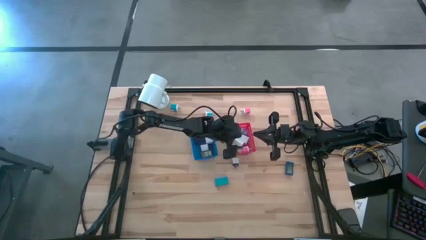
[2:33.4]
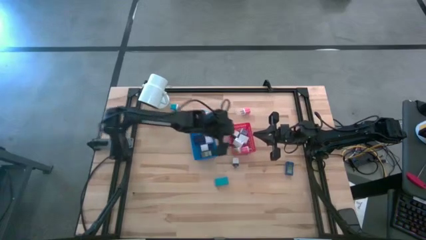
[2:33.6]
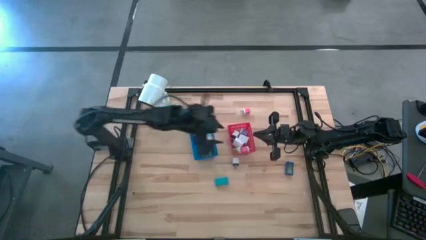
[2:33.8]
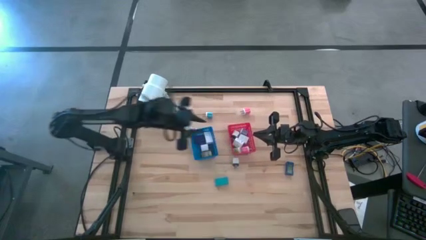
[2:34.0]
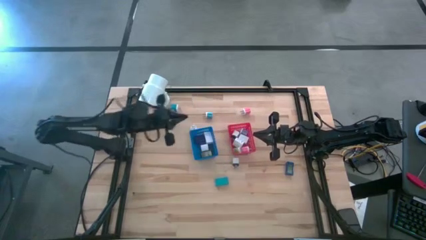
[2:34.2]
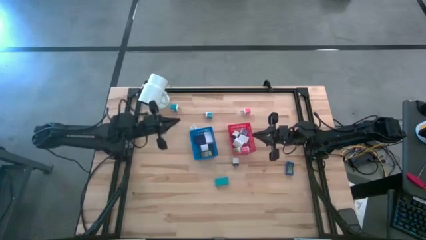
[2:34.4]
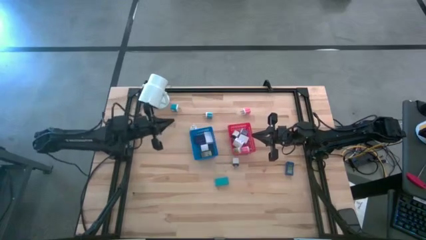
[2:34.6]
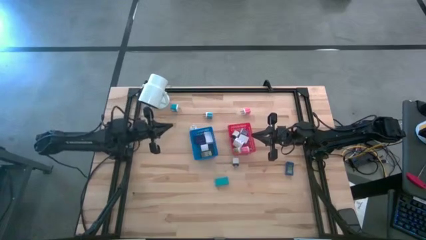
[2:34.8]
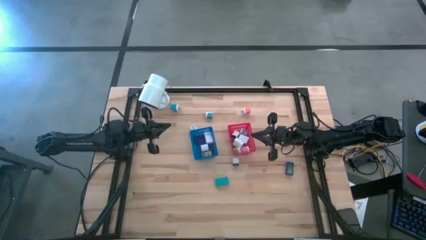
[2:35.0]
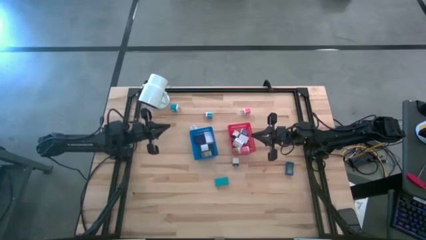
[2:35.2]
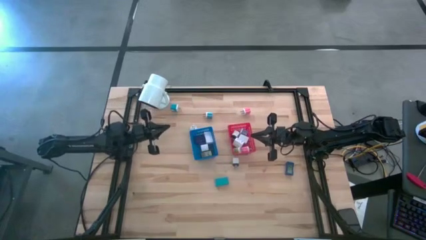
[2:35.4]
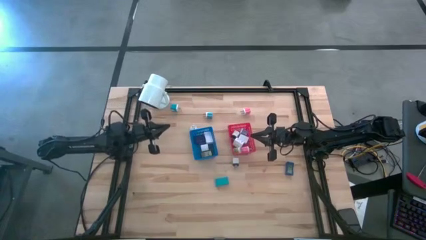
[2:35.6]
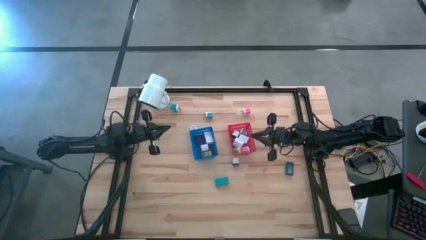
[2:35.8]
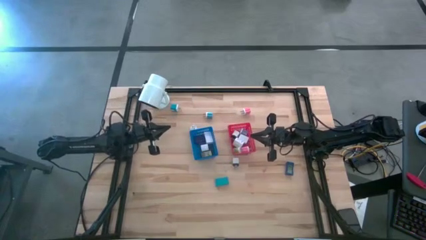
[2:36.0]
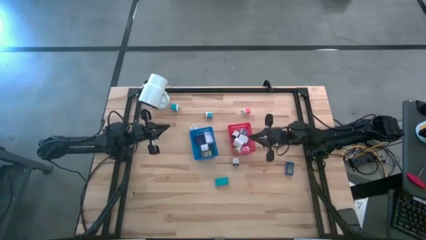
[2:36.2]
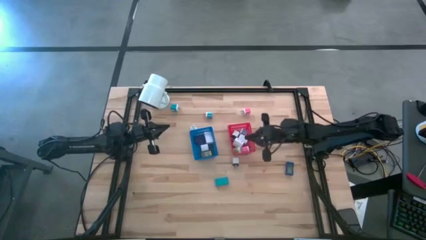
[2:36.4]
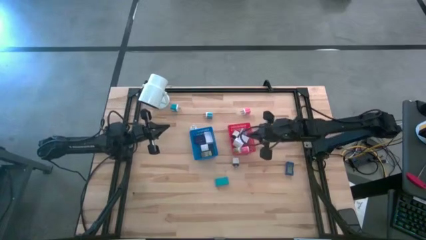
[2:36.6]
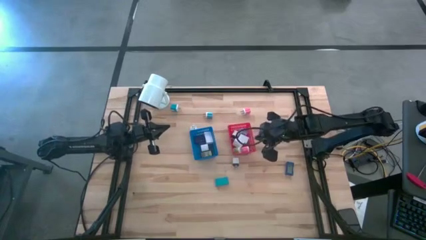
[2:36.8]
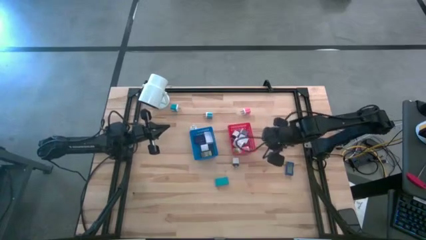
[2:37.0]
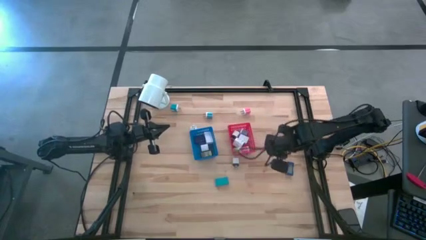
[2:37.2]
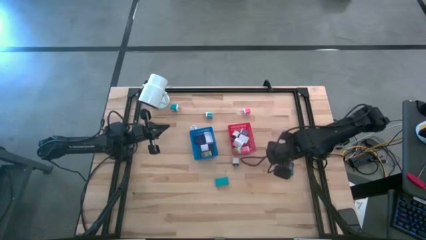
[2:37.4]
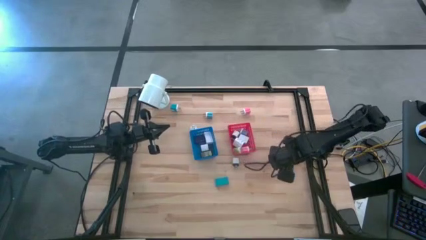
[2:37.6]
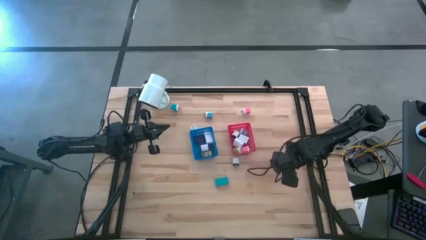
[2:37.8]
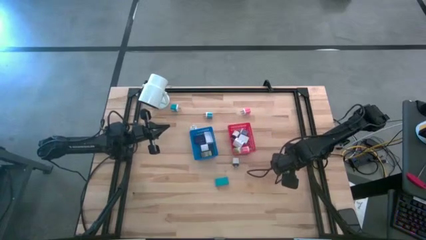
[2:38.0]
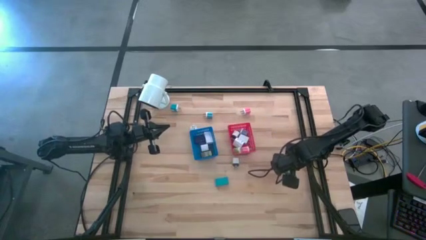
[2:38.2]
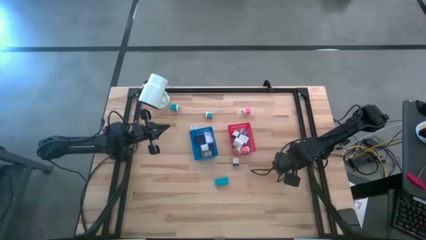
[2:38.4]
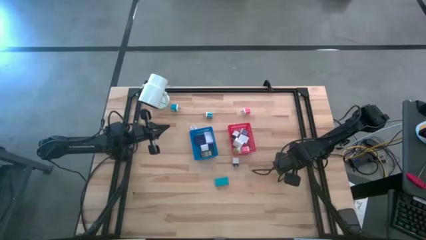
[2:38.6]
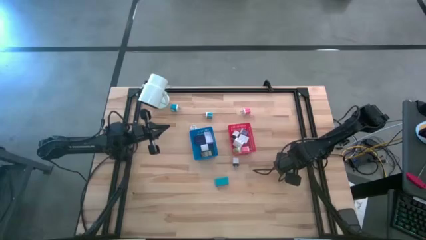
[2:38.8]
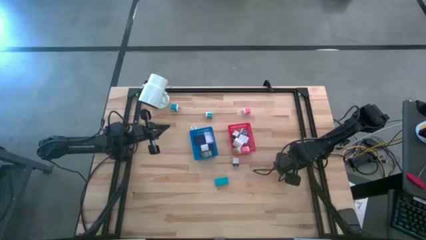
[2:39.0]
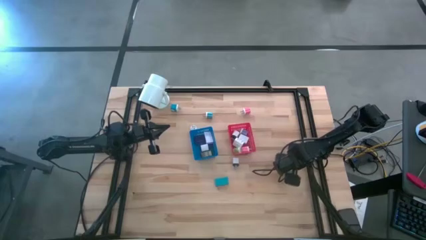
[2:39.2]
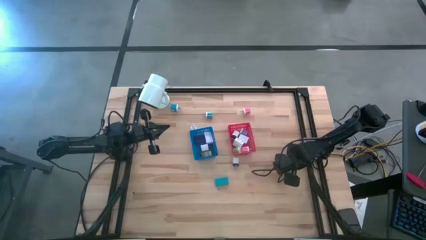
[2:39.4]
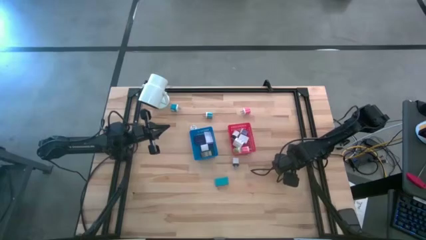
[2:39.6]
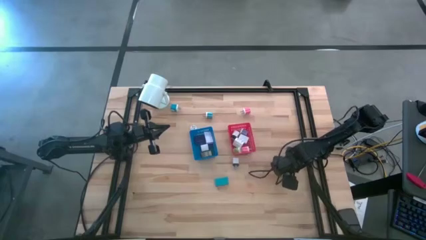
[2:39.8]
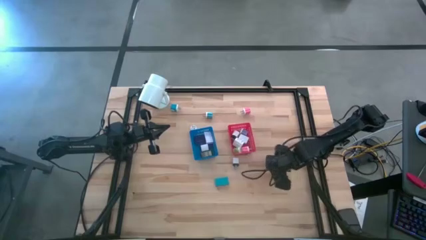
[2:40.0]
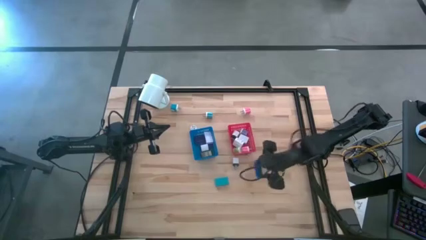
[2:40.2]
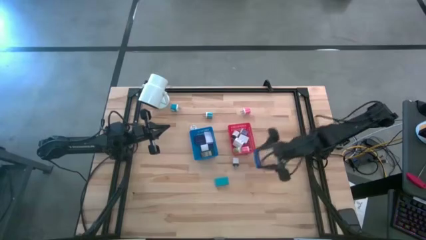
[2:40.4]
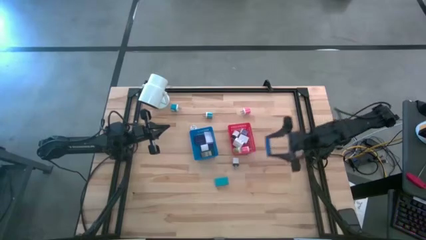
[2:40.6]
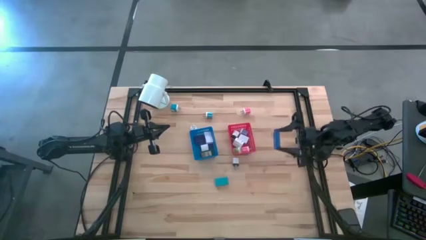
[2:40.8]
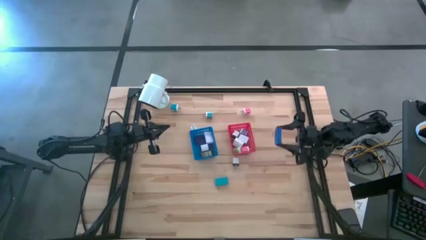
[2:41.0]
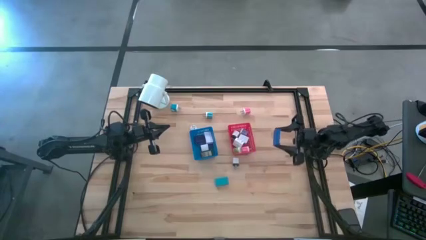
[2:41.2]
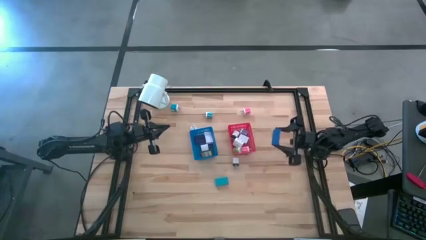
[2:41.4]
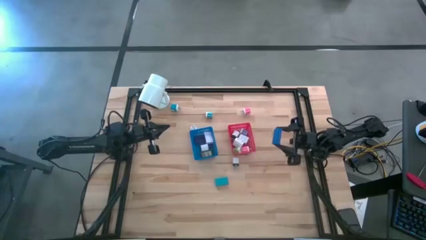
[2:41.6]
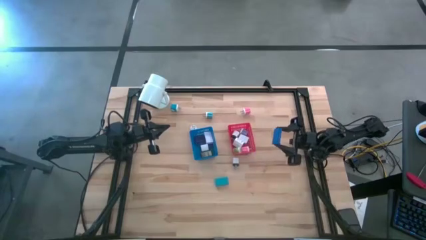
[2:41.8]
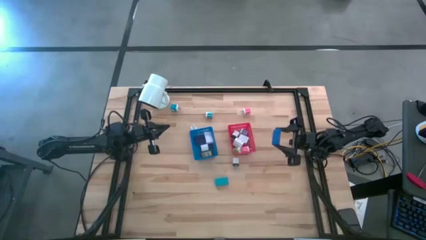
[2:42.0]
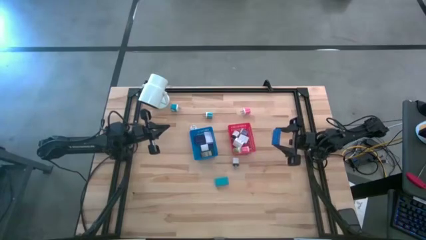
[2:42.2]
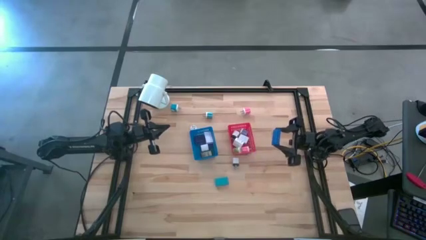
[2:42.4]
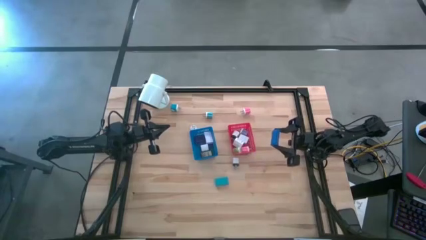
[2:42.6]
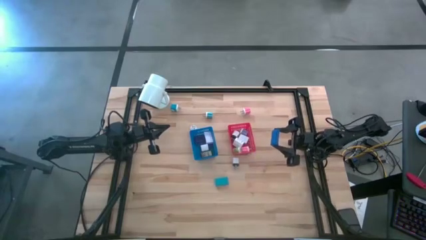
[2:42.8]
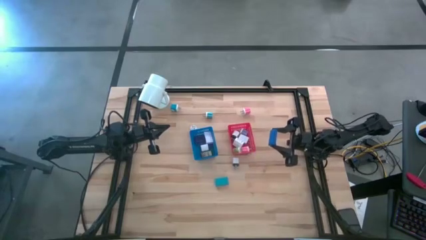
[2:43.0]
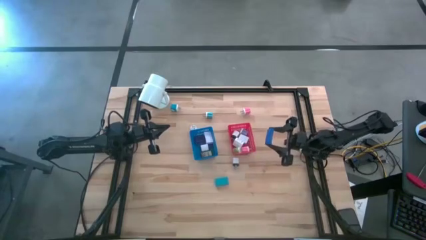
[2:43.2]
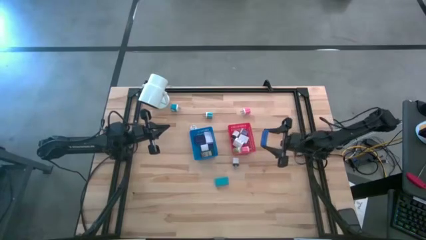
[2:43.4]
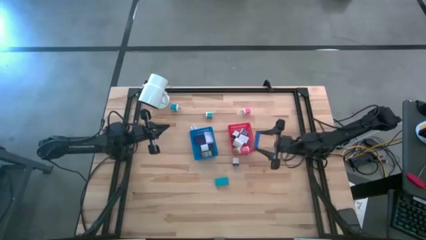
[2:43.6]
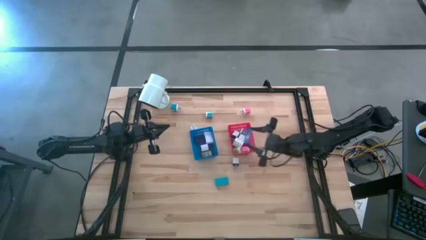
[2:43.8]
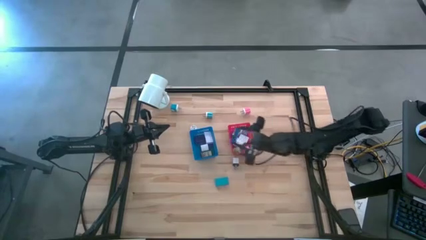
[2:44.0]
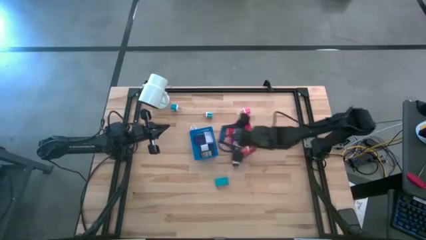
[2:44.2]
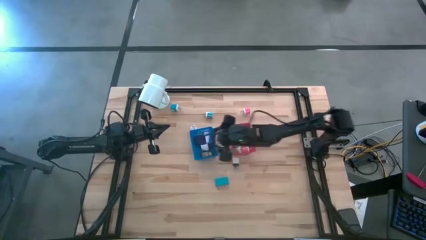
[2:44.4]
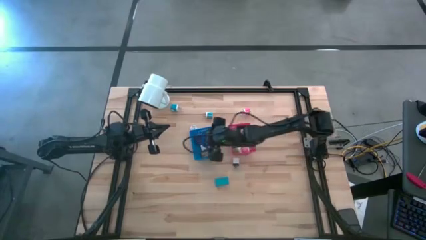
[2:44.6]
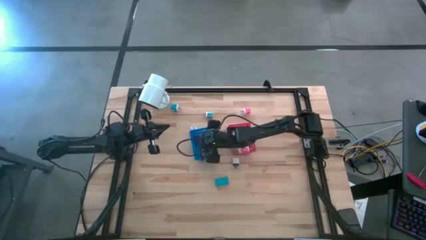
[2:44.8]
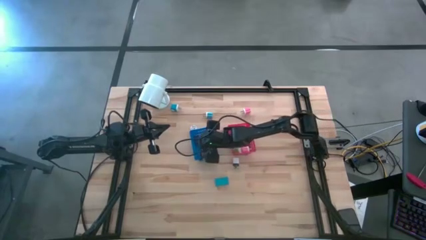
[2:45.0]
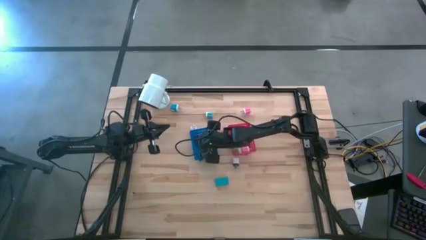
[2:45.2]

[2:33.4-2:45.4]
Task: Pick & Place Office items
Put the blue digital clock into the blue bin
